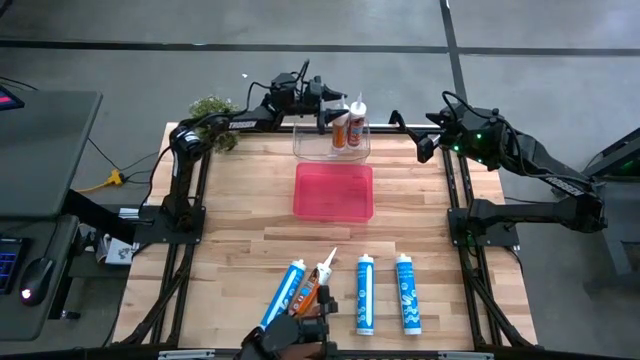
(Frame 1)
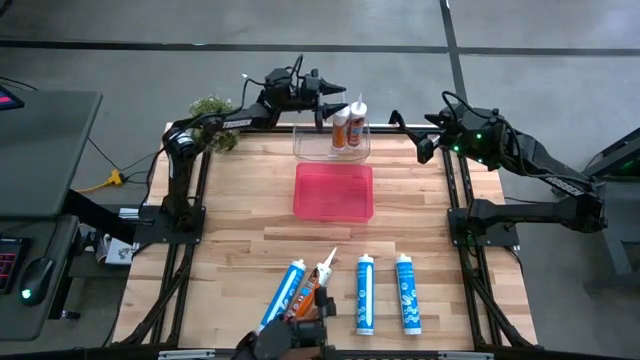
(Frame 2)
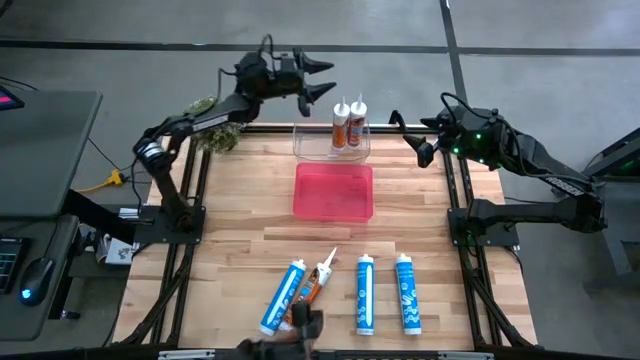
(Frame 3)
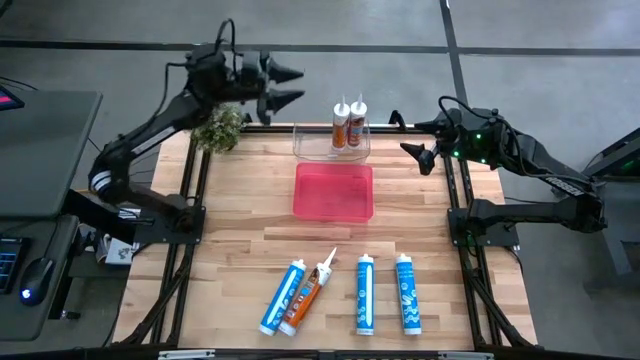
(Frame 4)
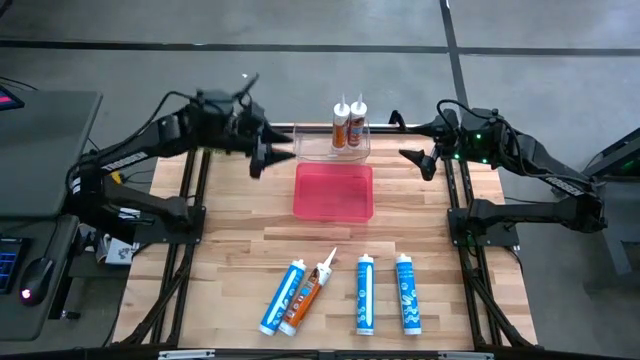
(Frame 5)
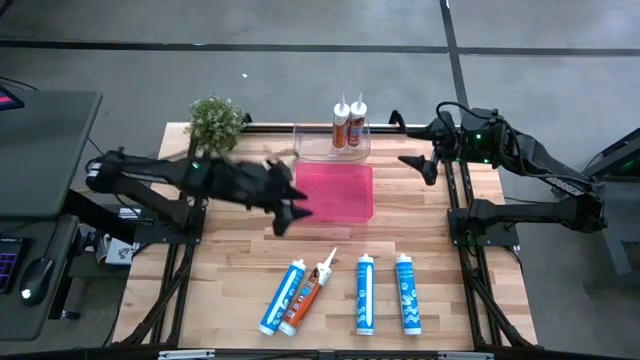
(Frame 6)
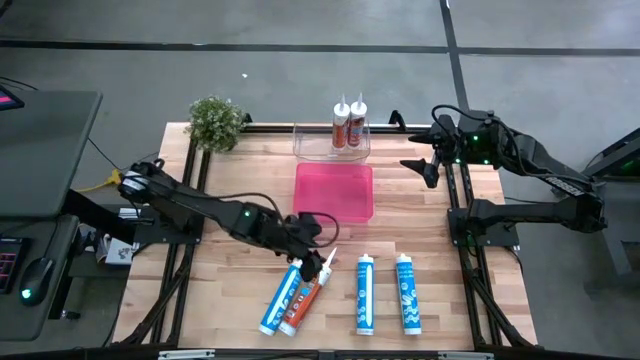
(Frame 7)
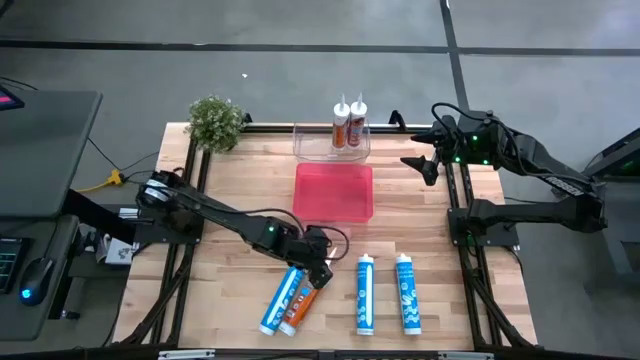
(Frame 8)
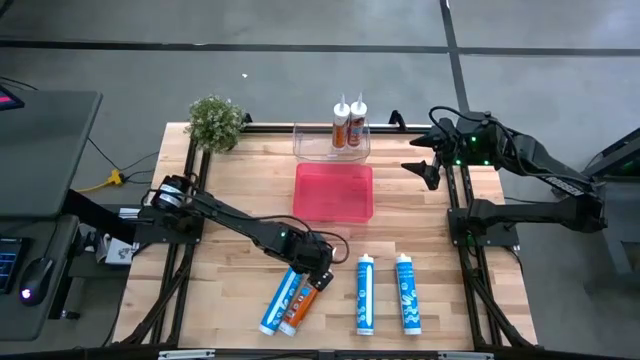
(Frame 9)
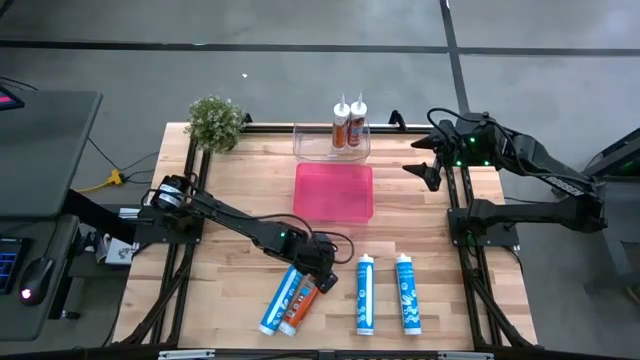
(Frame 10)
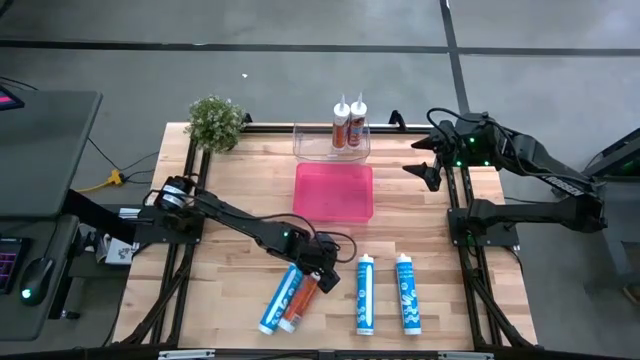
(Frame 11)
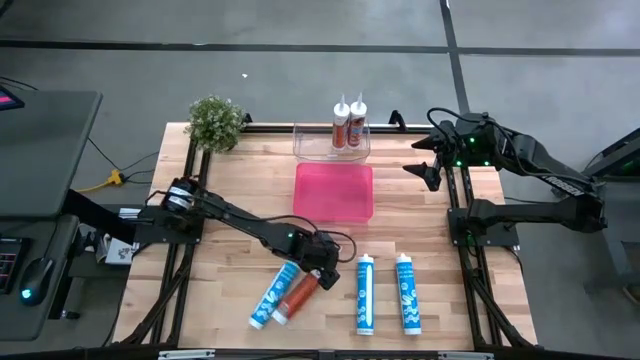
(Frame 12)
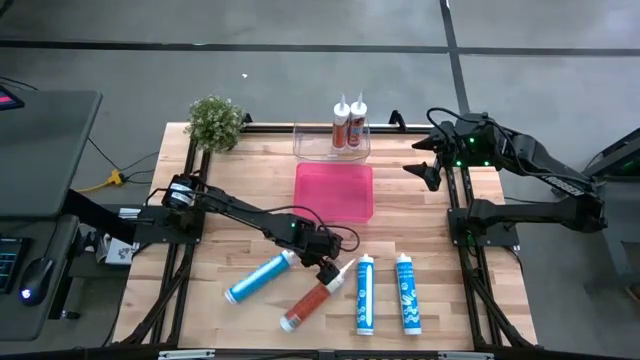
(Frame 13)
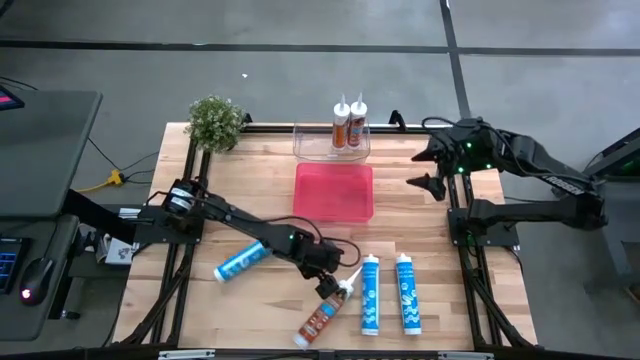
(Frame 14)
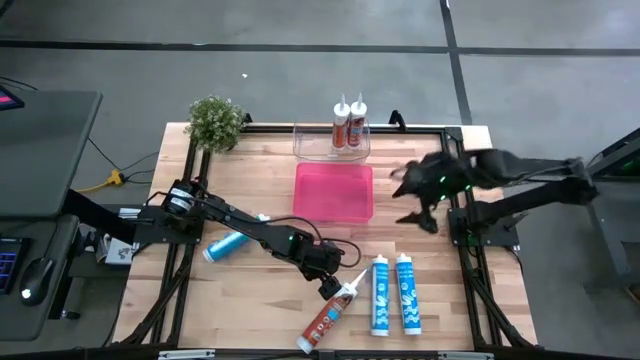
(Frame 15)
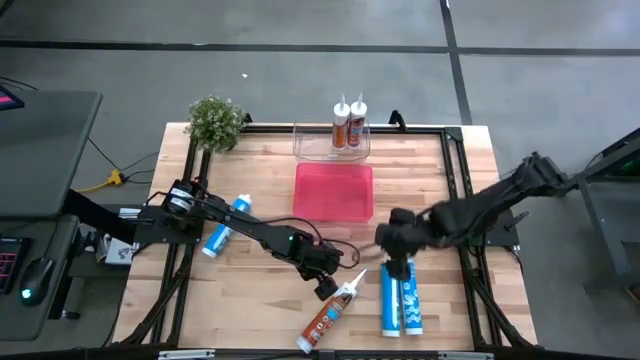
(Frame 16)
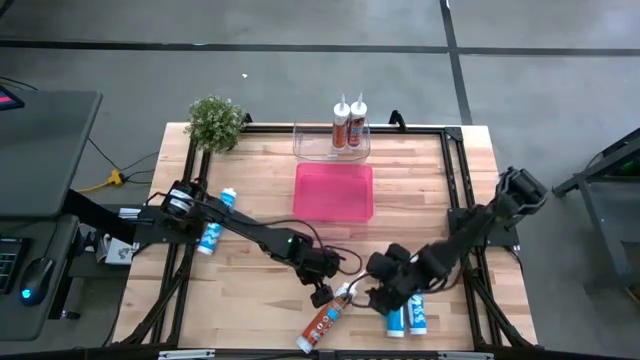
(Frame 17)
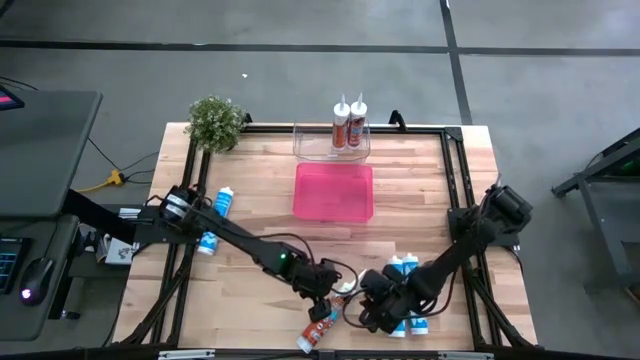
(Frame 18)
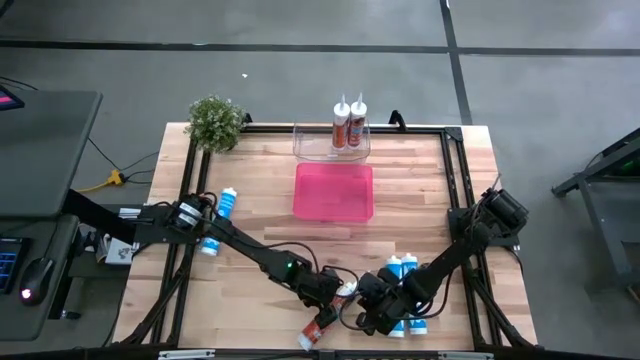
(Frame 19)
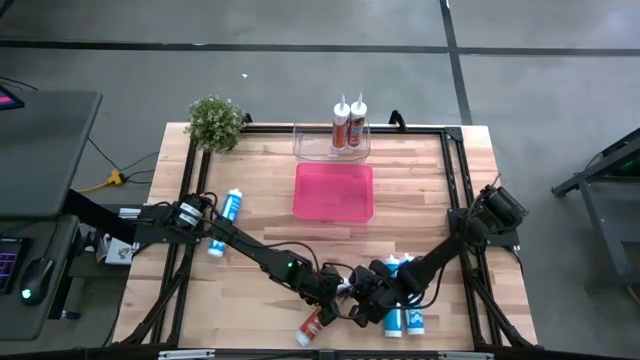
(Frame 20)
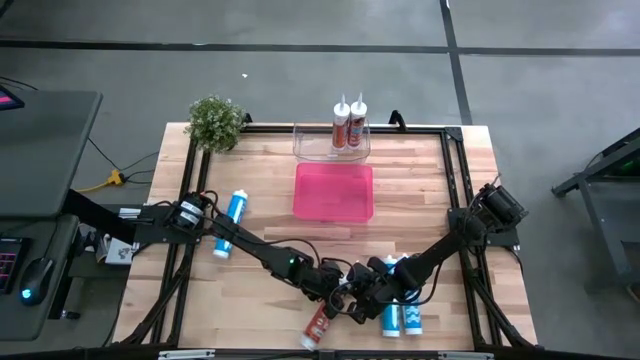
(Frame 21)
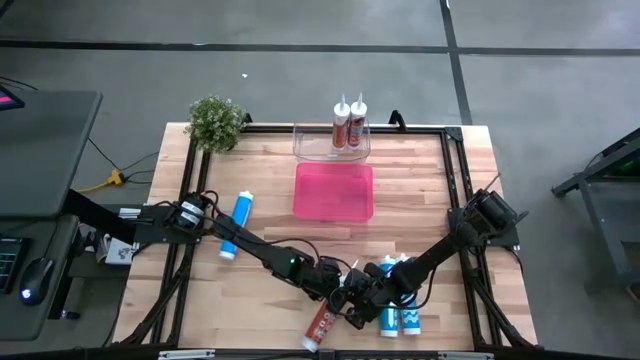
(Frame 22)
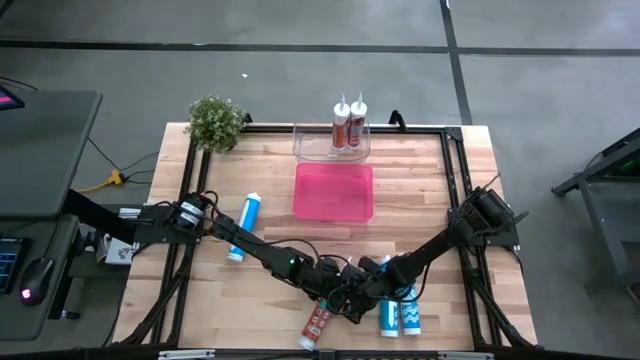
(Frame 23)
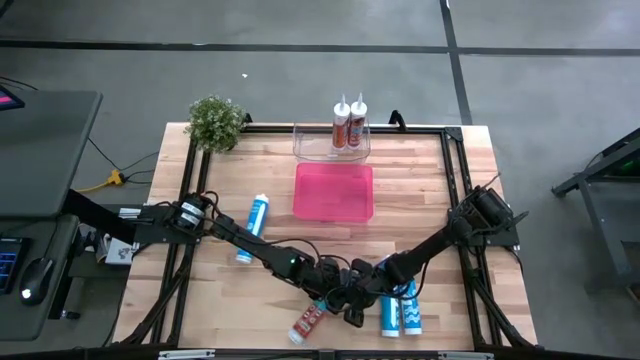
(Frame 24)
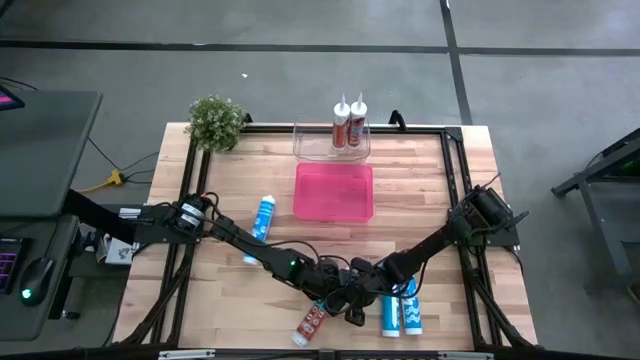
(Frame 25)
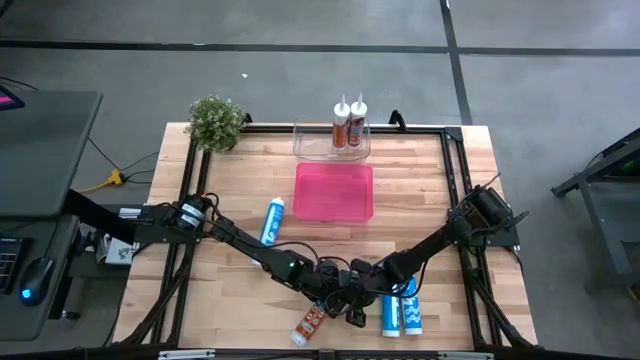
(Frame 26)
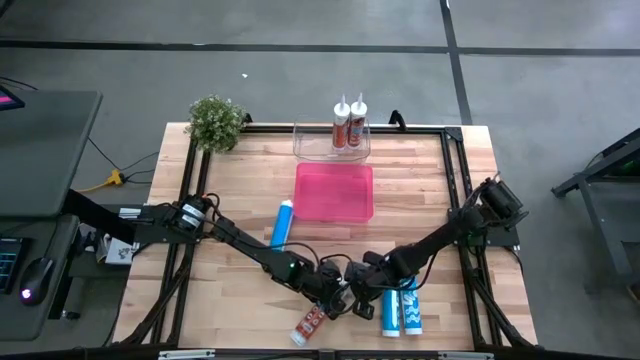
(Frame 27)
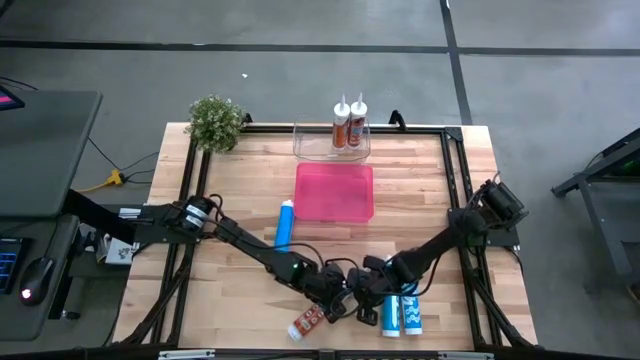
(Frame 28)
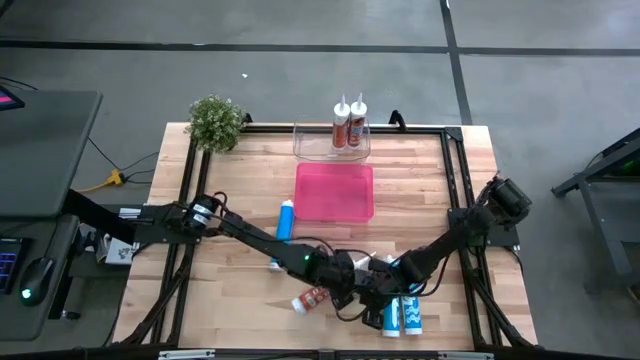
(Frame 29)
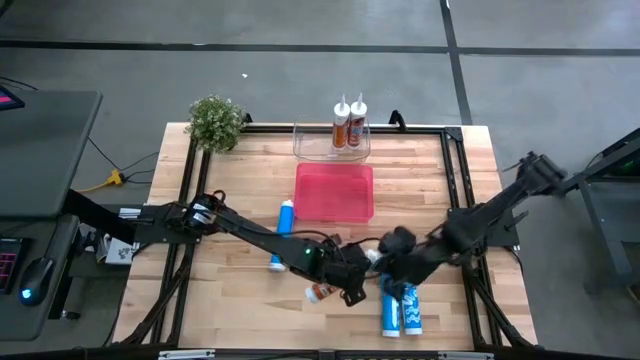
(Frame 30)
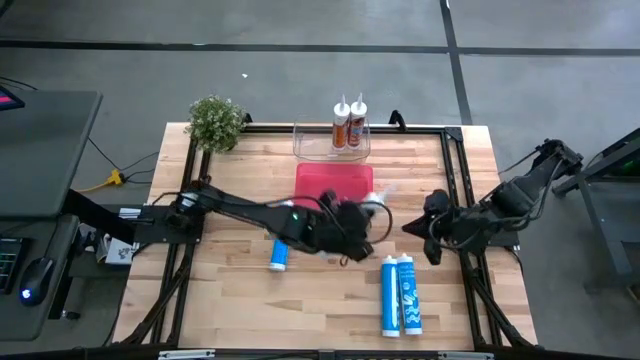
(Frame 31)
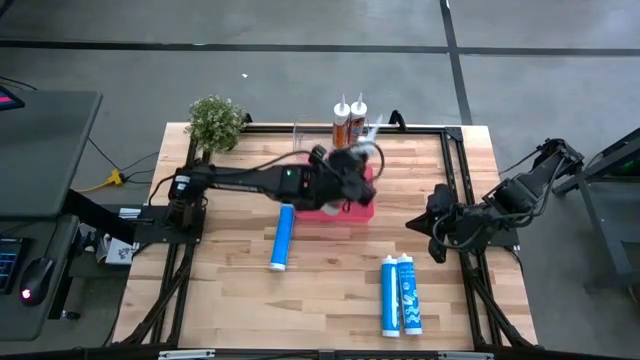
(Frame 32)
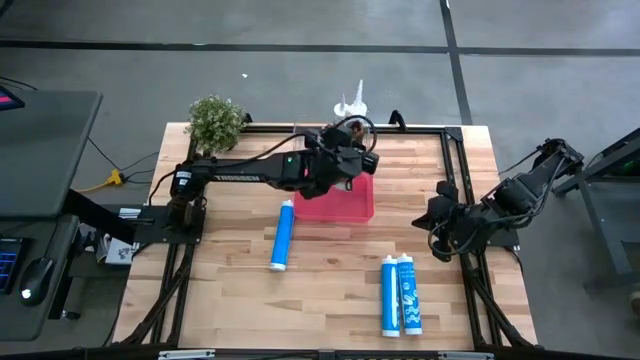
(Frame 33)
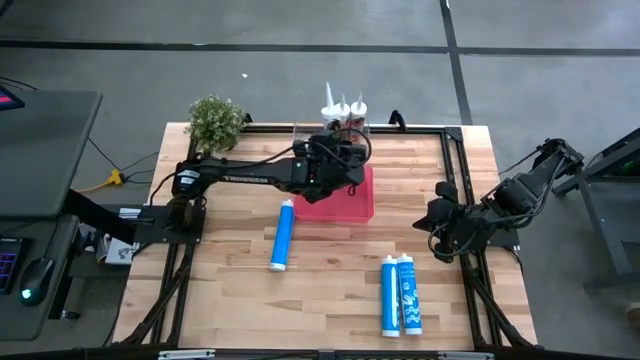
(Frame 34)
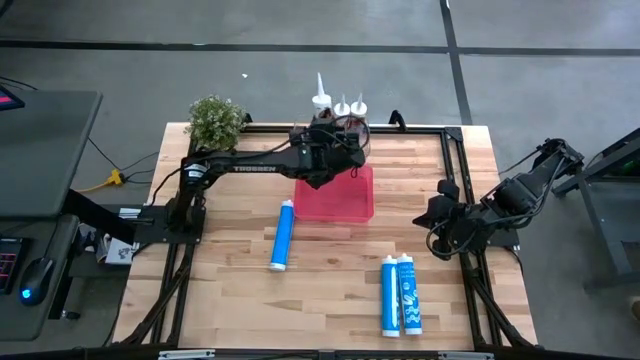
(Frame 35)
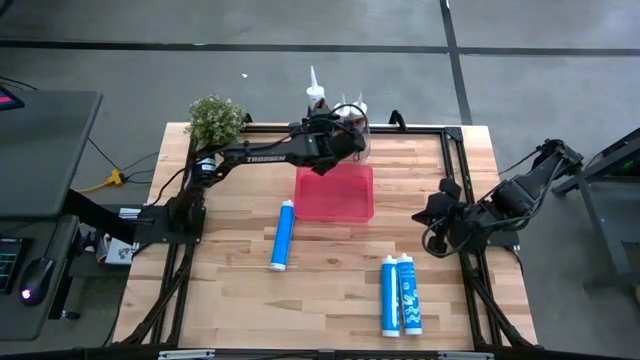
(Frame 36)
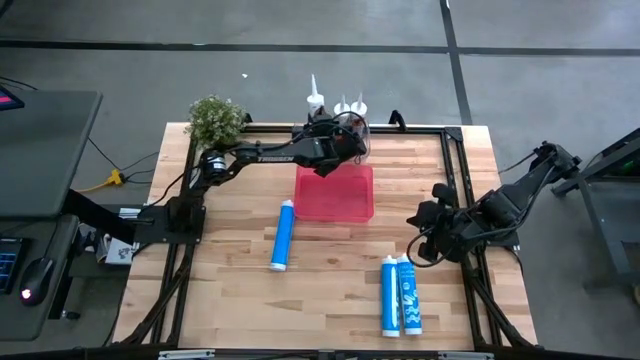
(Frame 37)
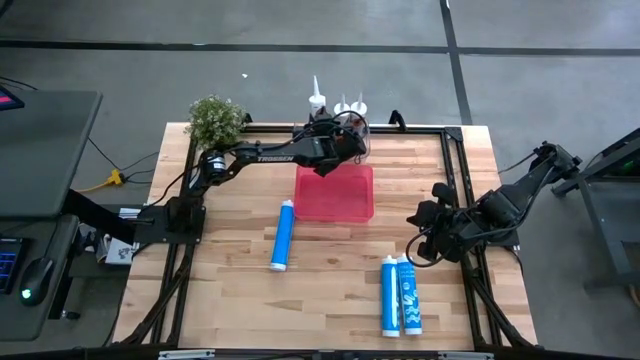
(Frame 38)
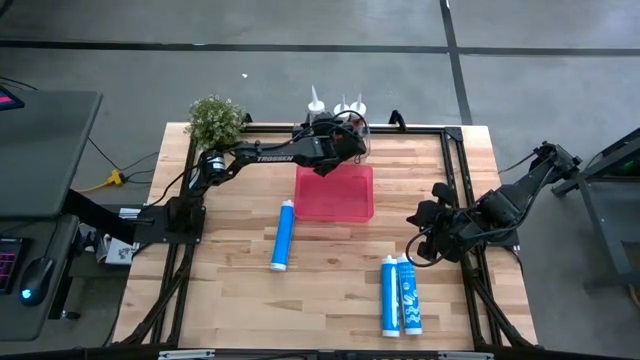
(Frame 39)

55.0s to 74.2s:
Task: Pick & place silicon tubes, Sealant and Lysol wipes
Put the orange sealant into the transparent container

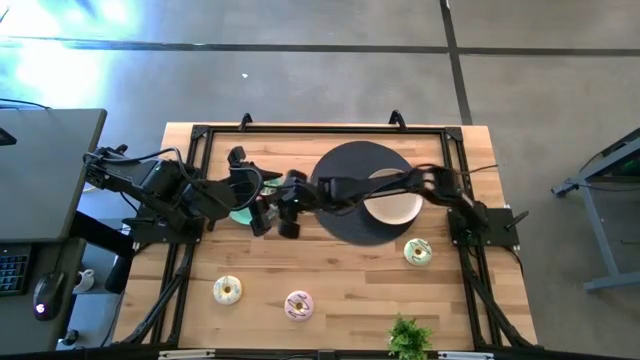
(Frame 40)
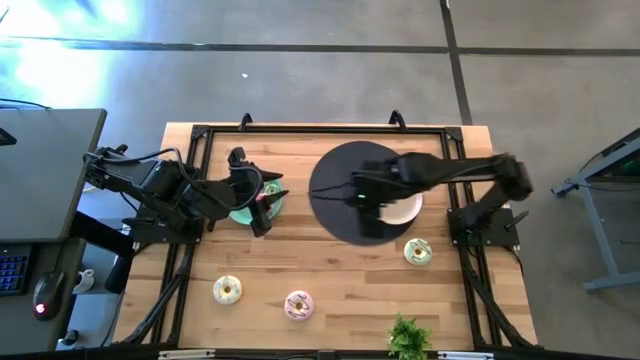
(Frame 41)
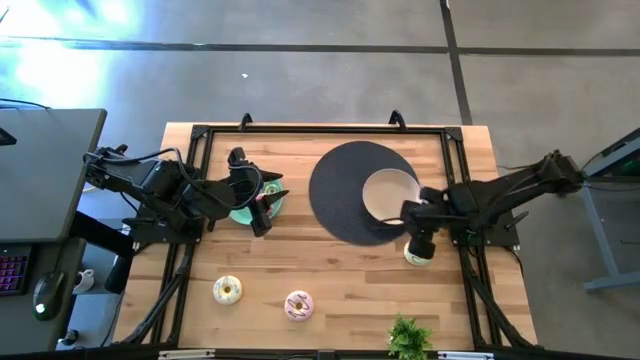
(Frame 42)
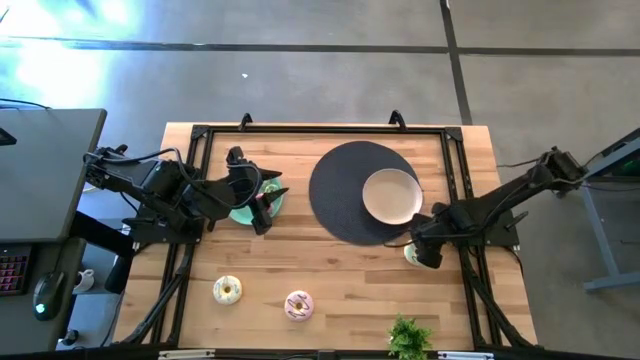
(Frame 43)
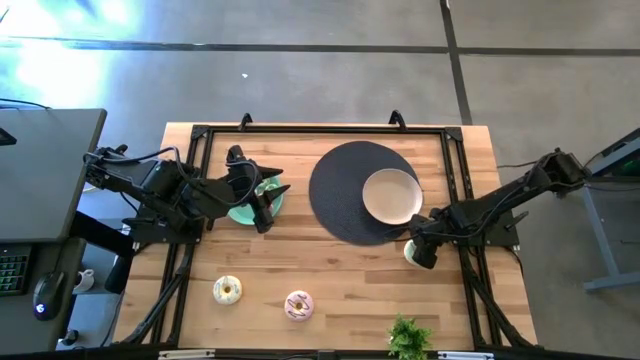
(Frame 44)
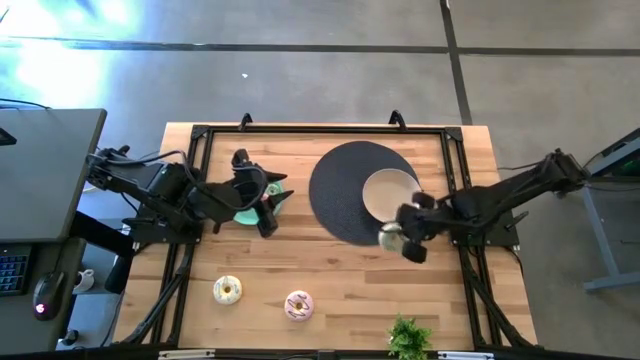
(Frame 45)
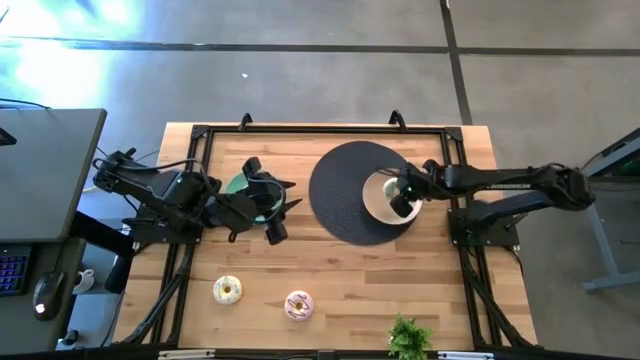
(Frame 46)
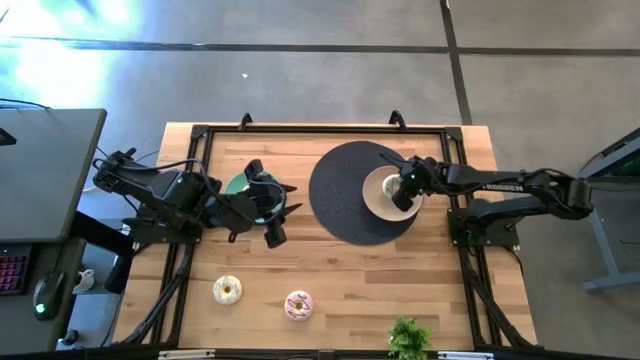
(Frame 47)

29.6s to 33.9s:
Task: Pick & Place donuts
Put the large blue donut onto the white plate
